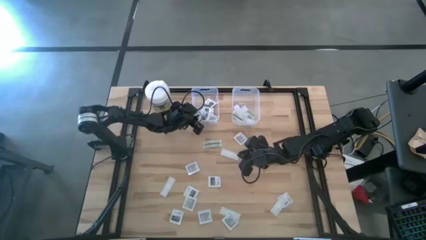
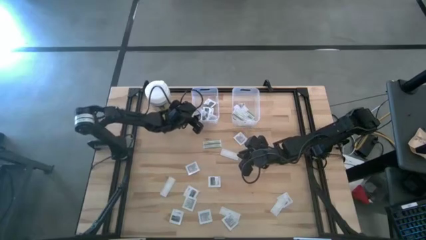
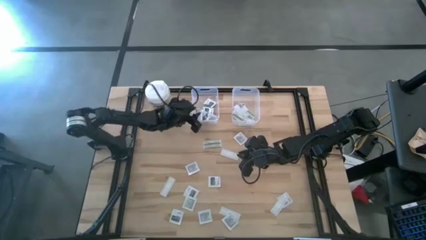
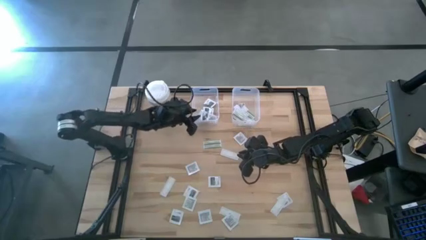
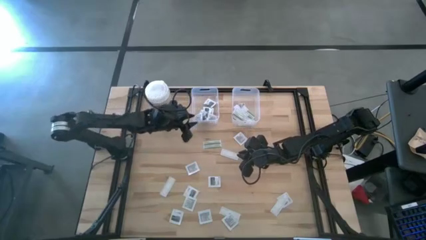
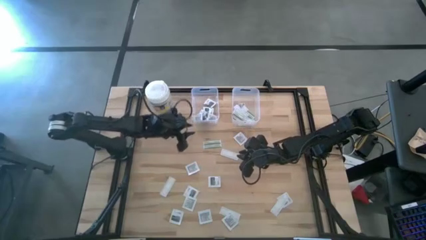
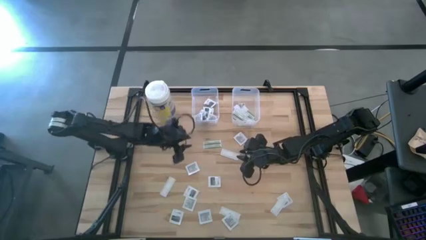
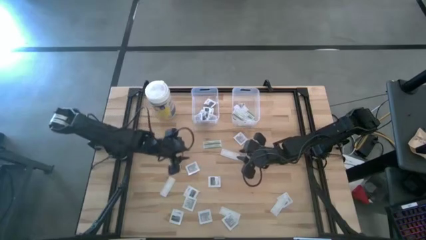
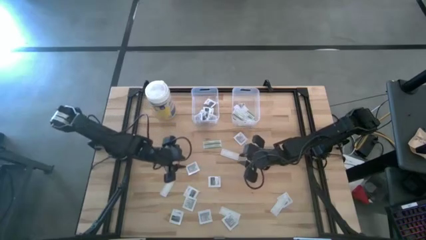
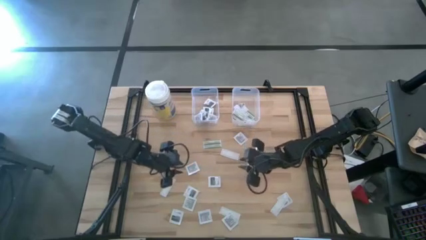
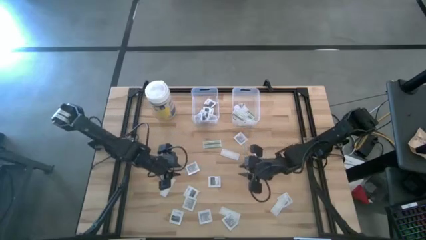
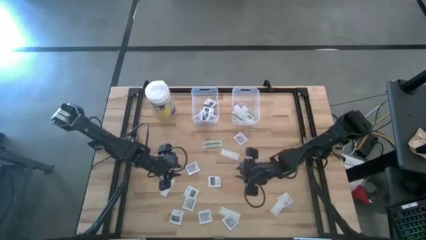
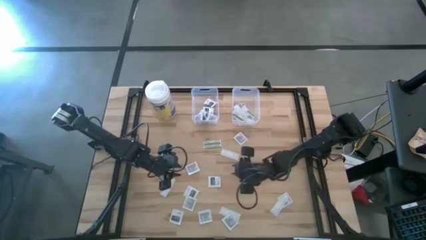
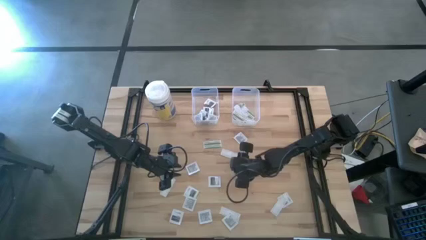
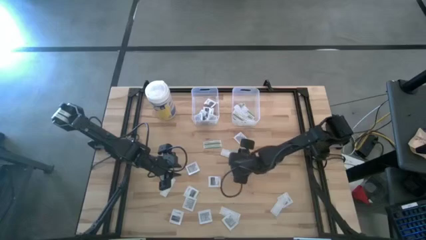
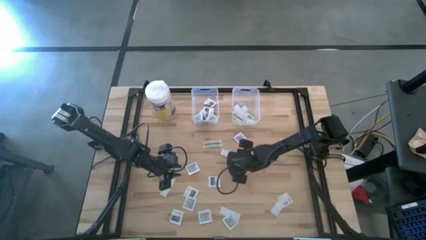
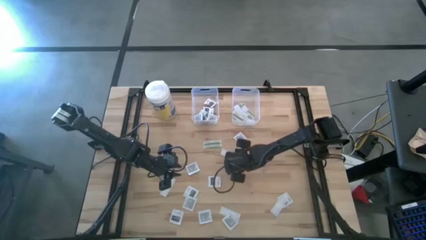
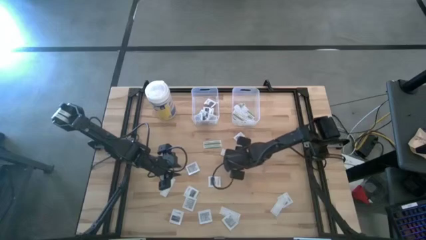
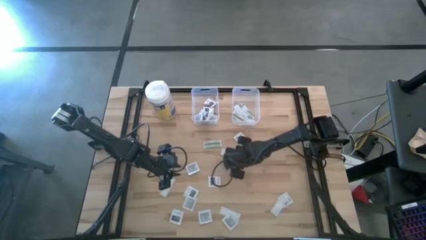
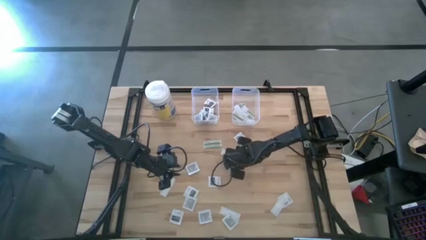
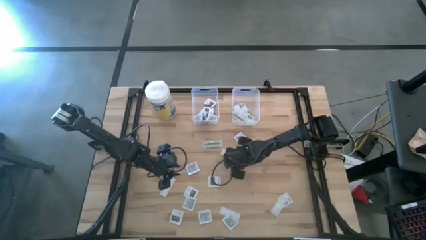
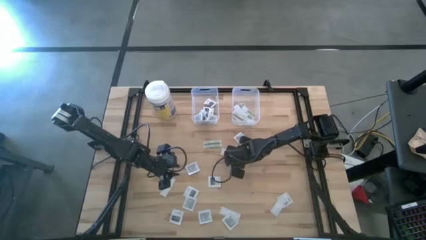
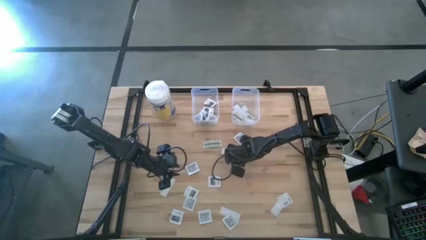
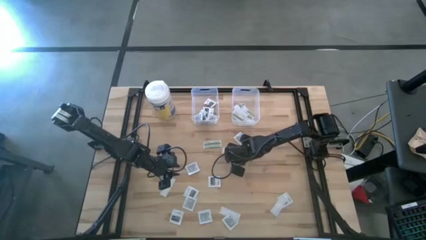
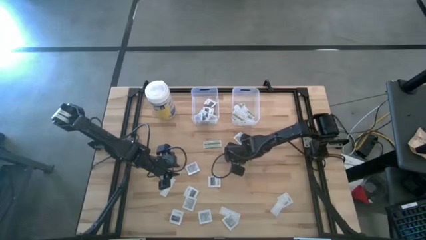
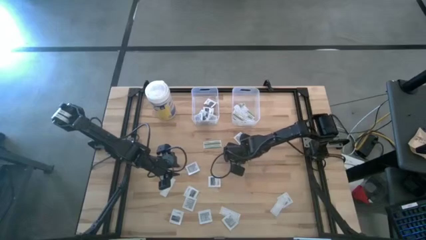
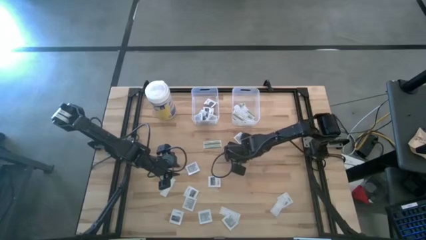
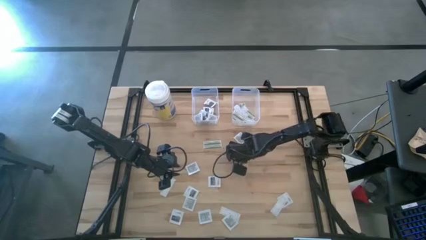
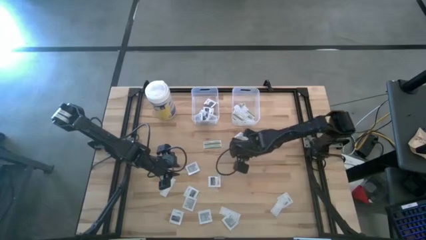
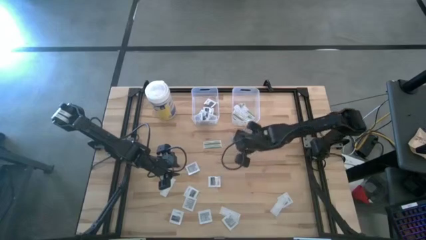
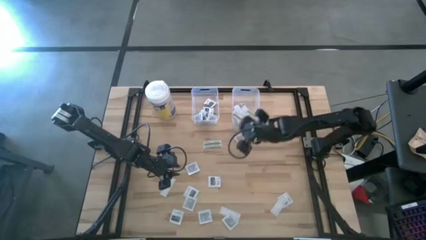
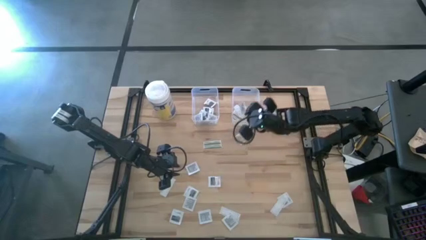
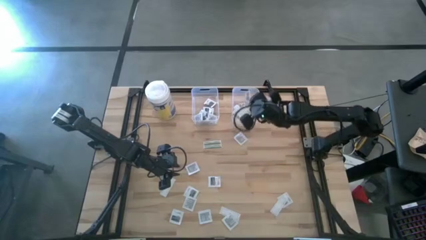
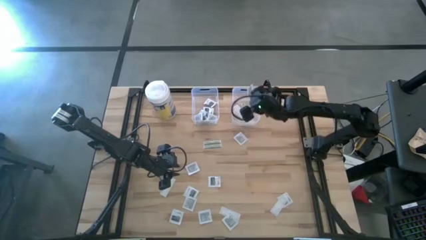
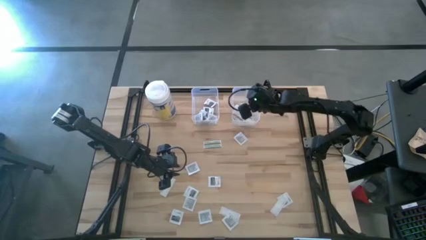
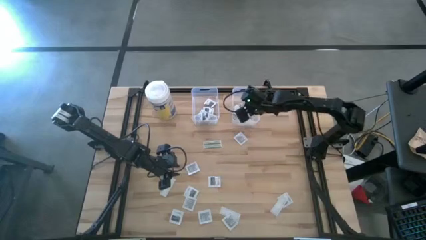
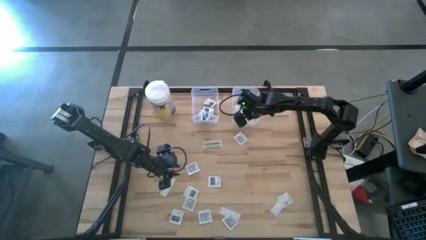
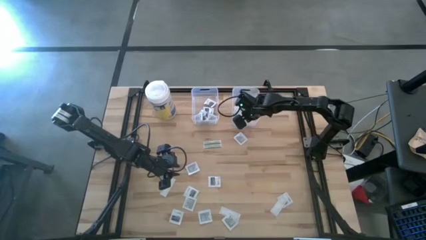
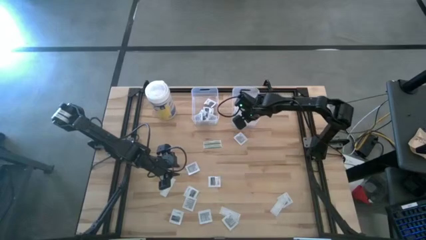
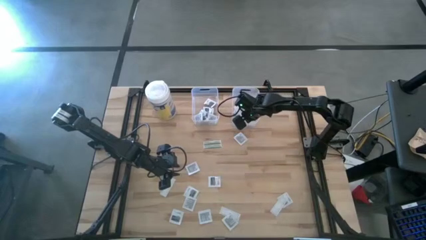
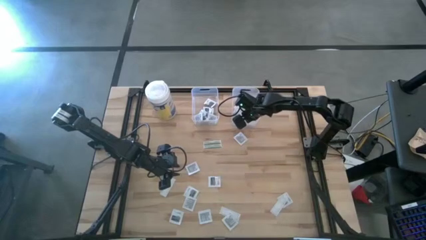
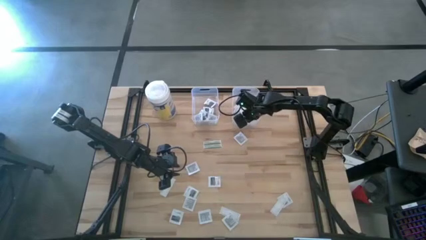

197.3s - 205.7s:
Task: Pick & Place First Aid Supplies
Put the bandage into the right transparent bin

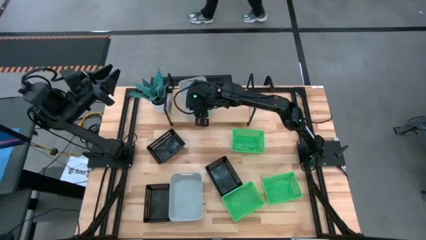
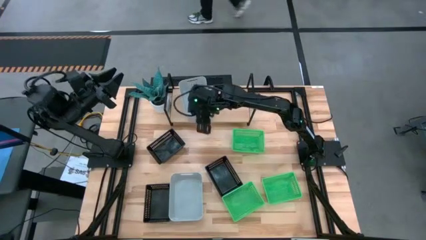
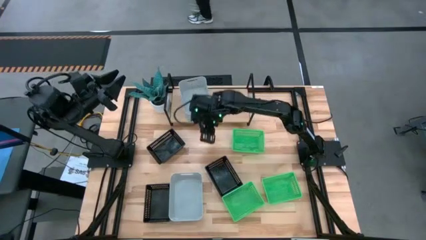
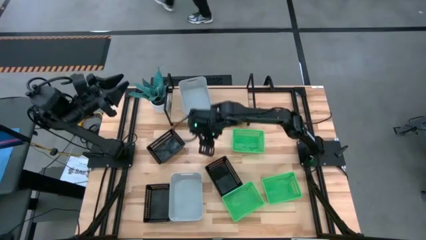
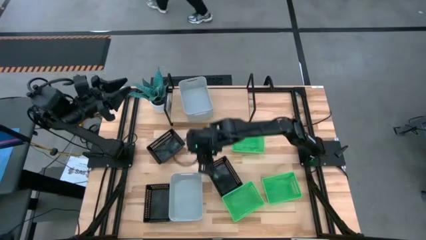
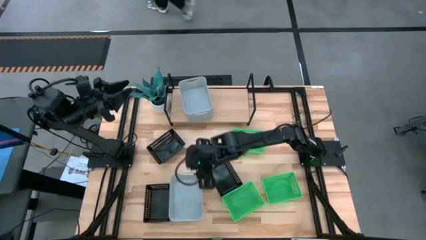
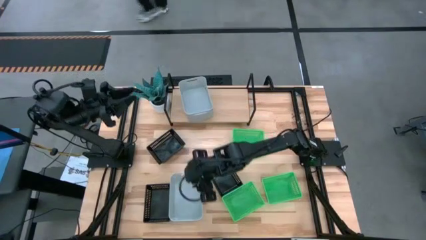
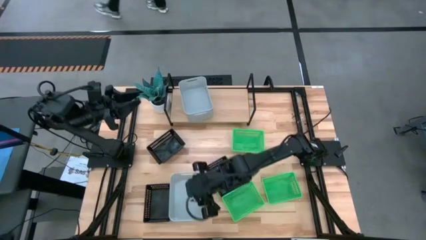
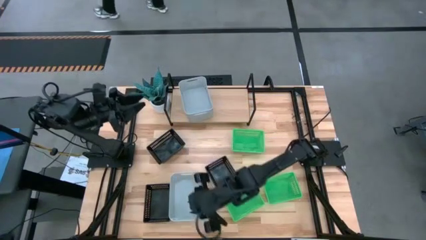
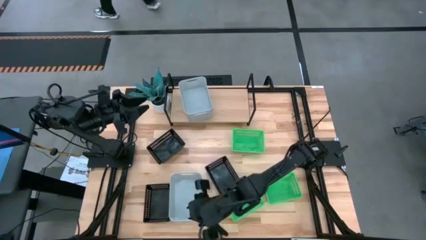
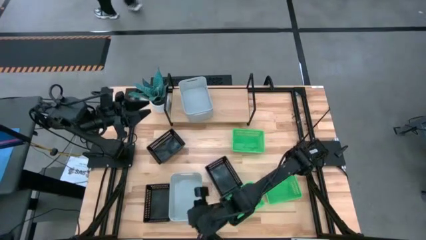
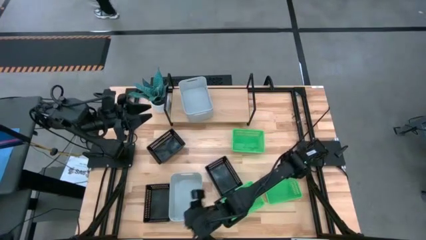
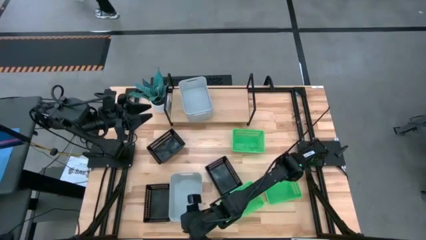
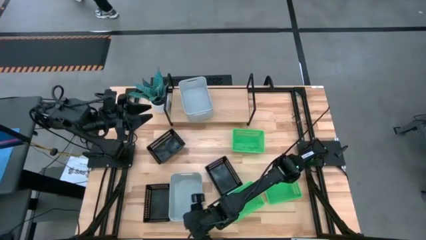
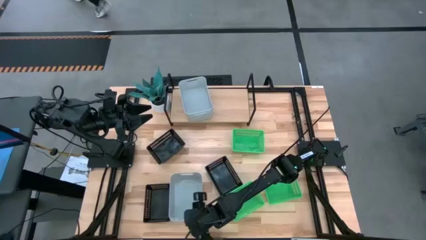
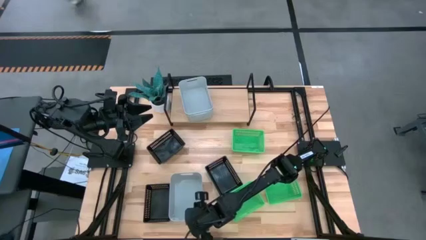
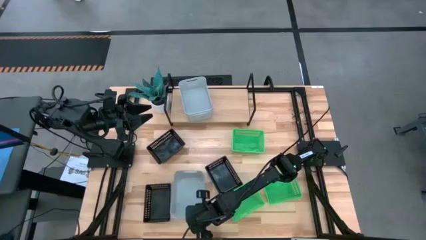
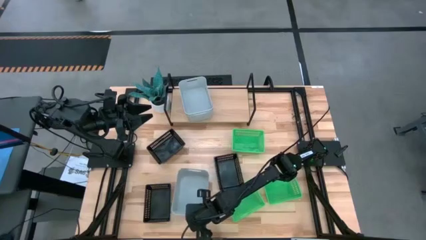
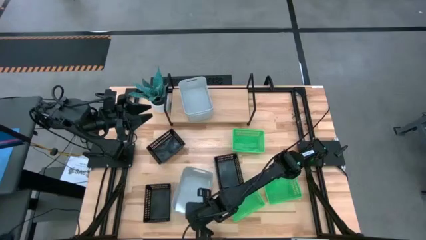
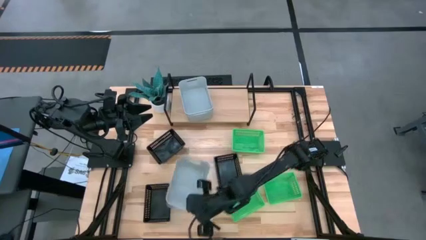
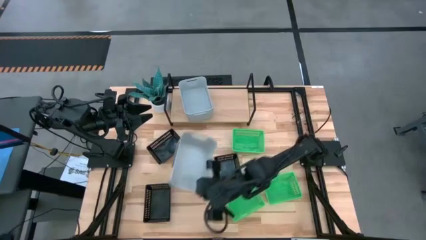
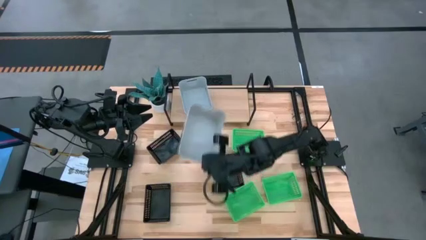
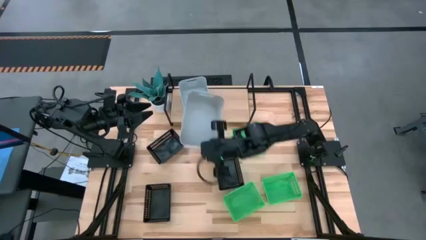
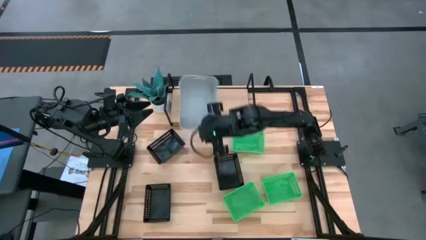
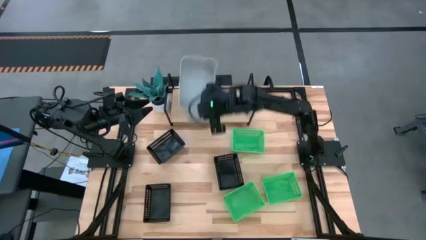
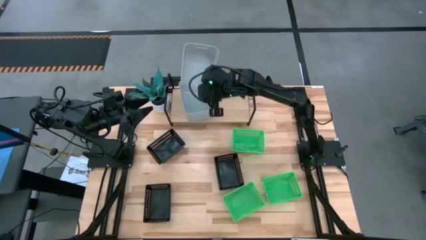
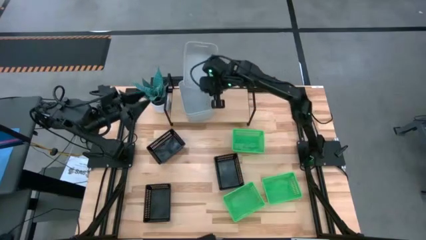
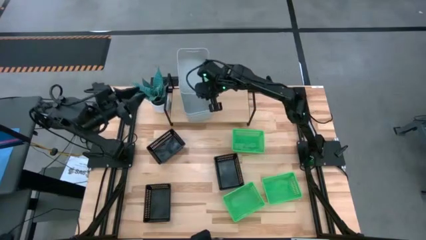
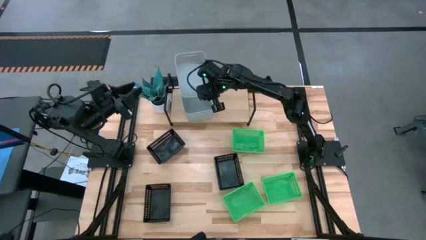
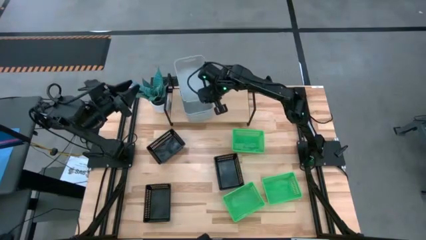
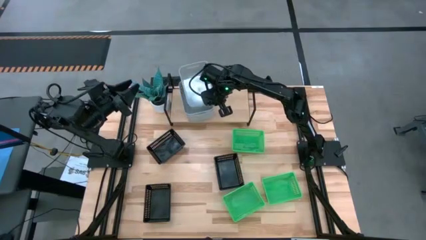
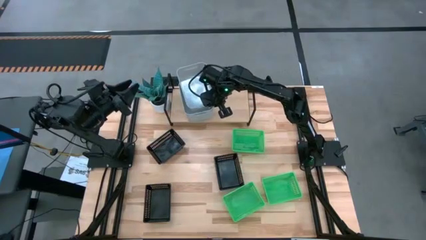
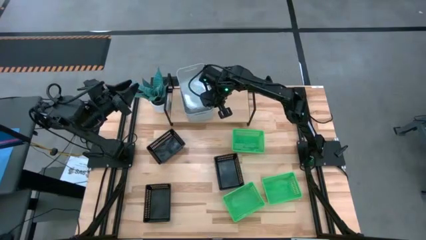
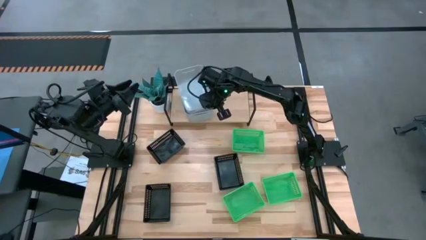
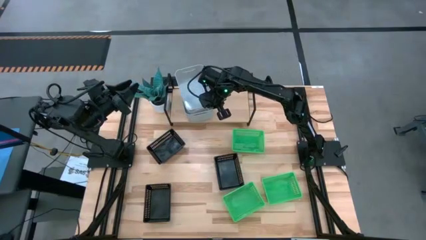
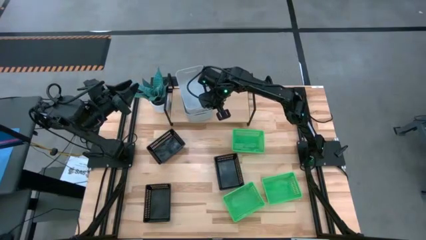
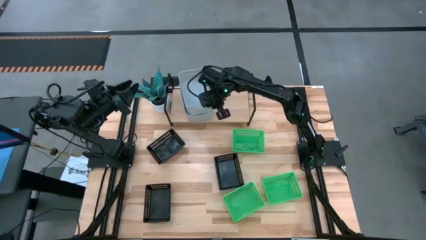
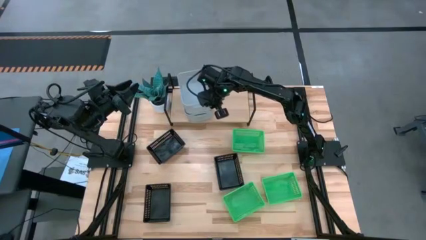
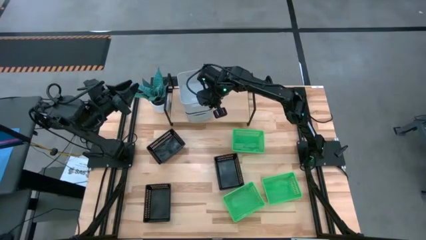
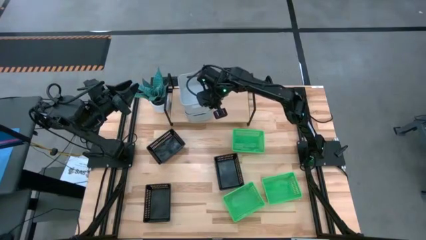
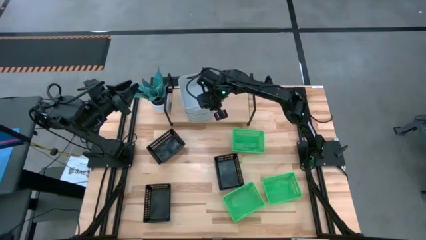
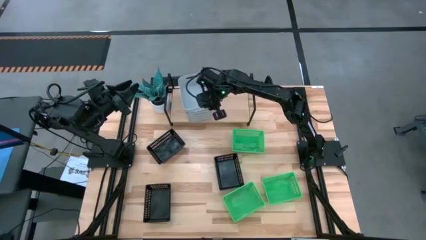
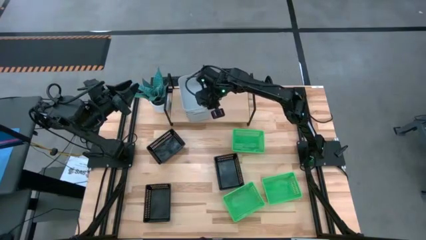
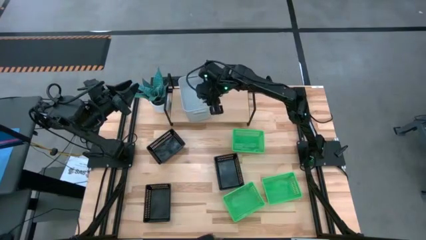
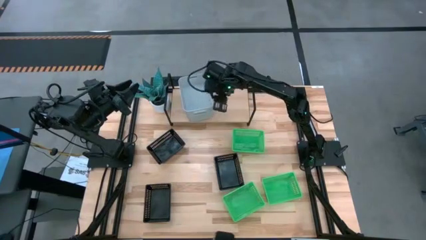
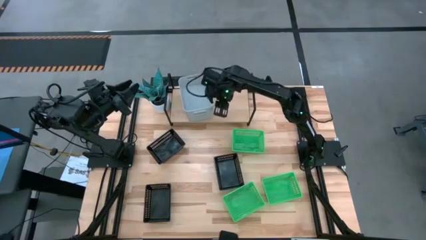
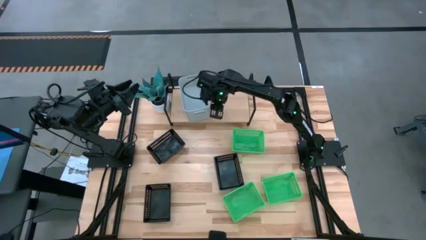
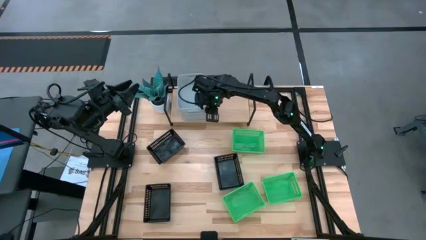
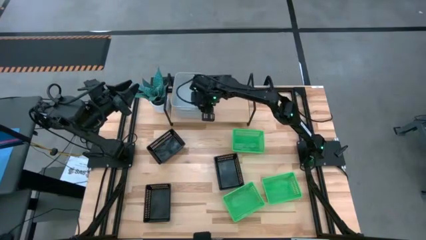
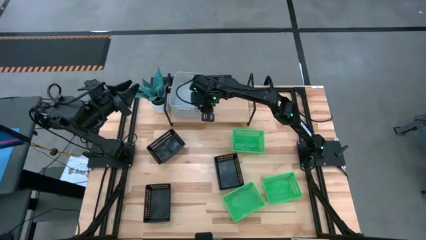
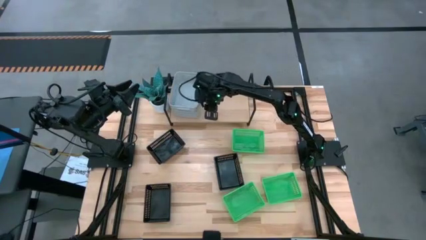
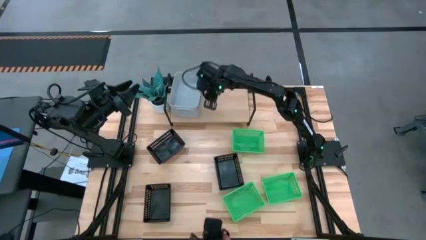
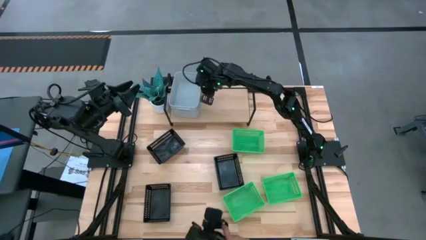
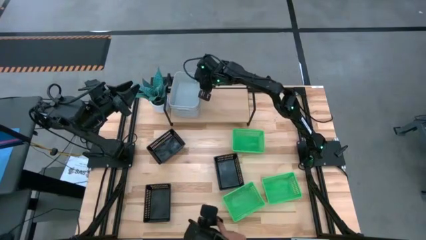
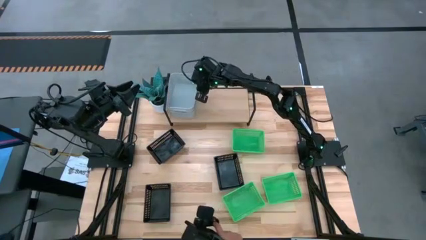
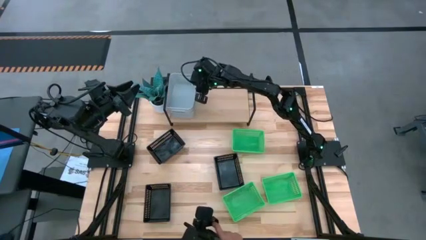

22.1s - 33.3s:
Task: Stack baskets on shelf by color
Stack the gray bin on the gray bin on the shelf
